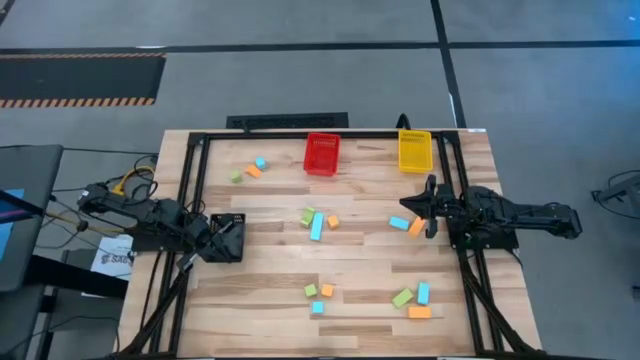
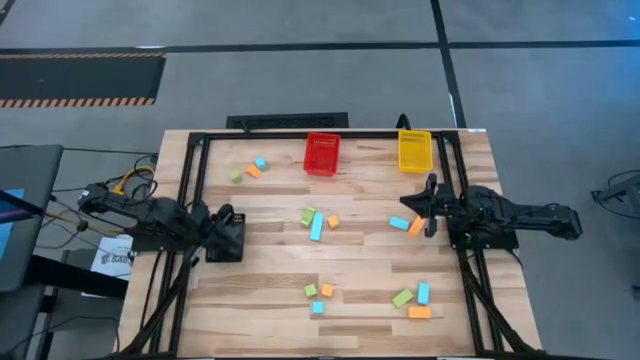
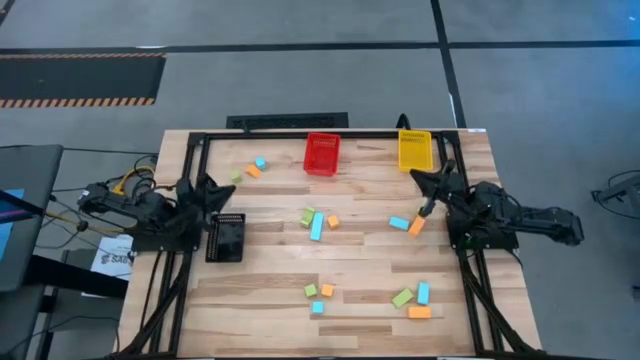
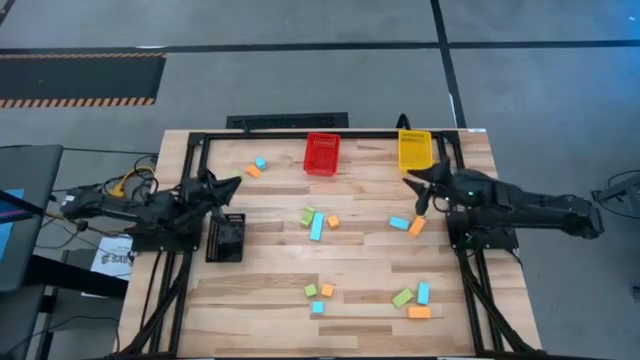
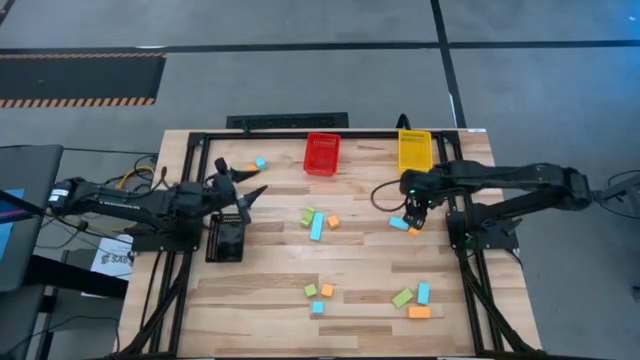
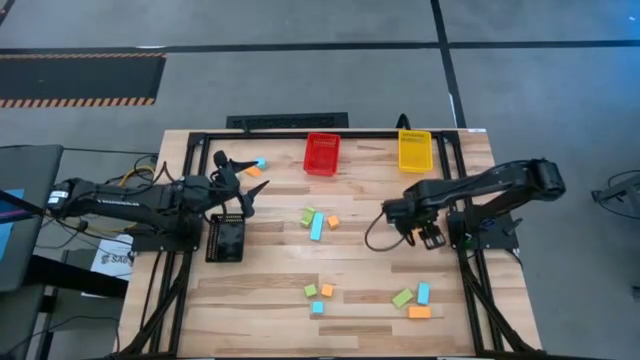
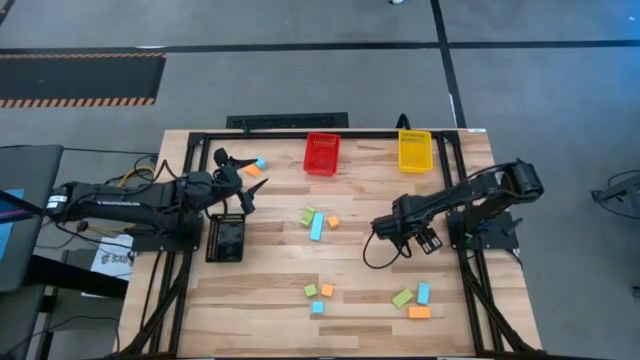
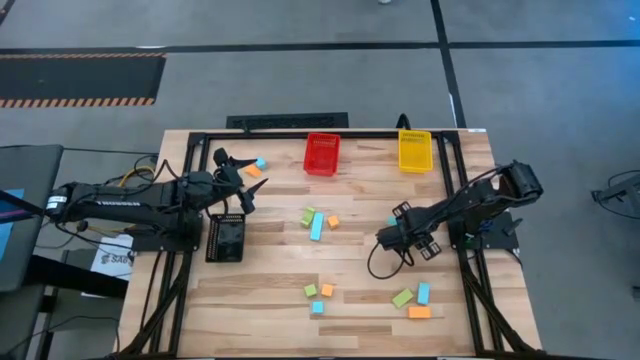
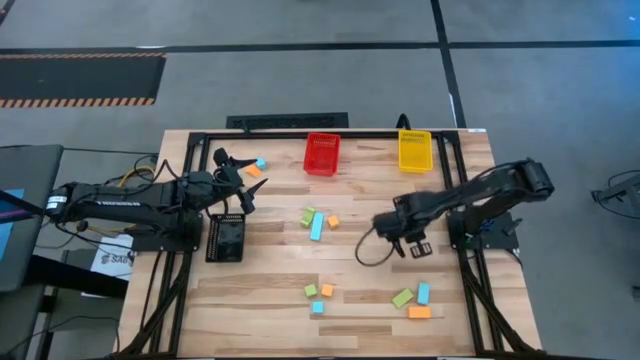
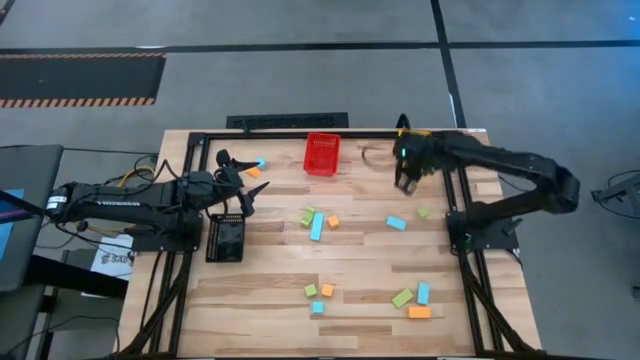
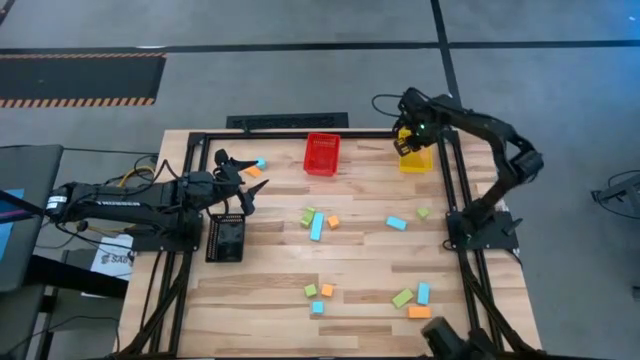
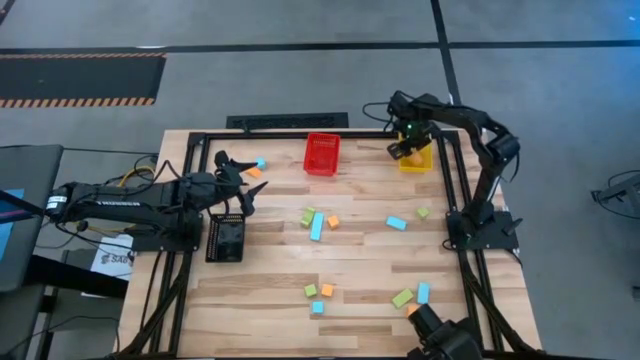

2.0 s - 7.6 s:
Task: Sort & place blocks by color
Put the orange block into the yellow bin

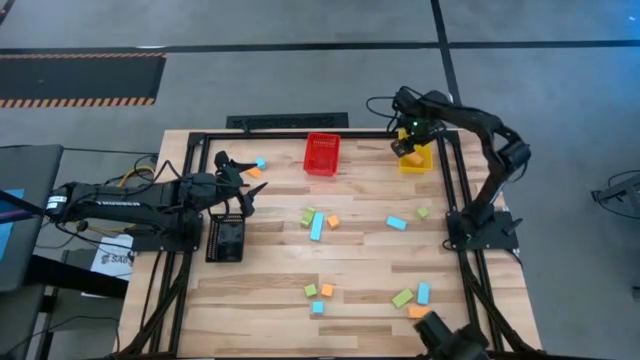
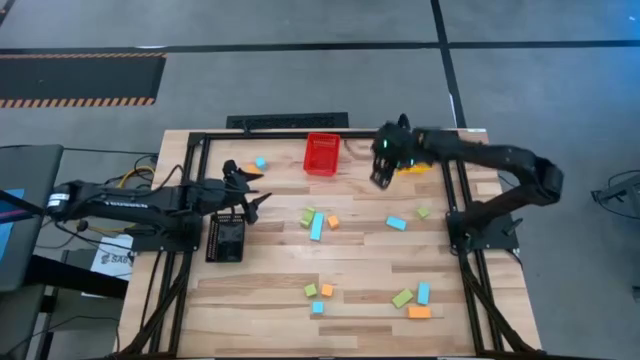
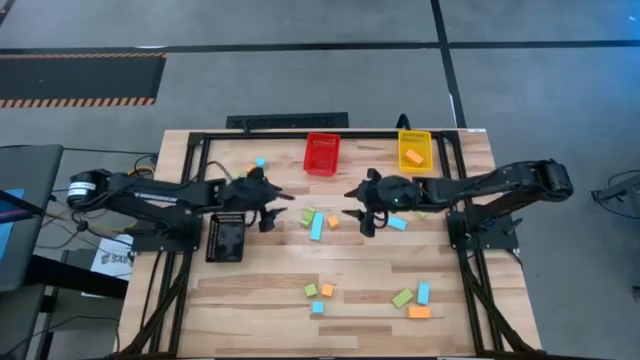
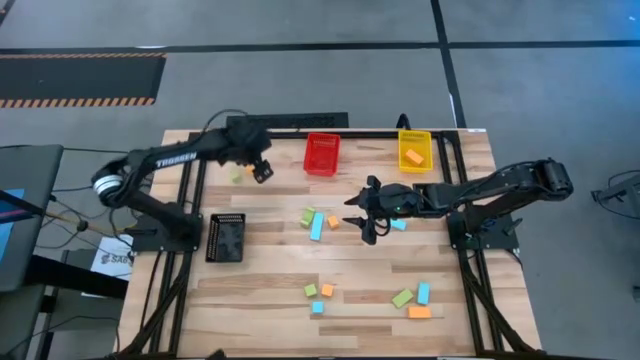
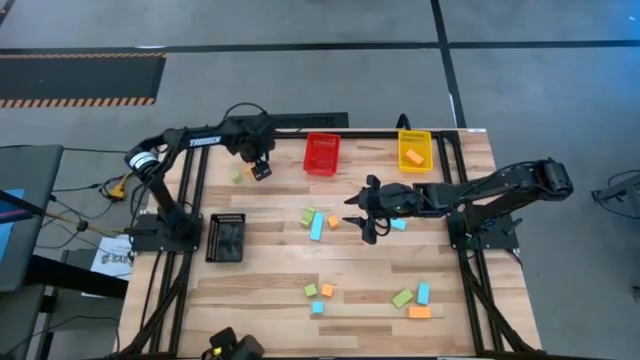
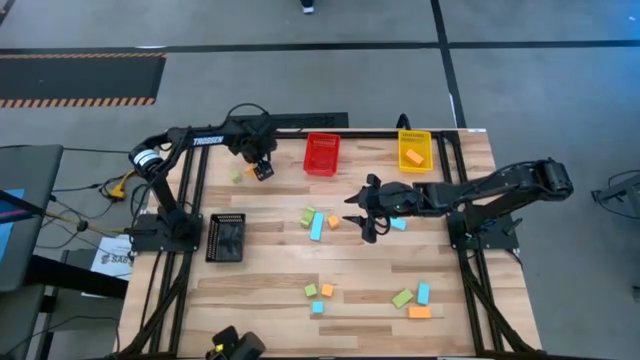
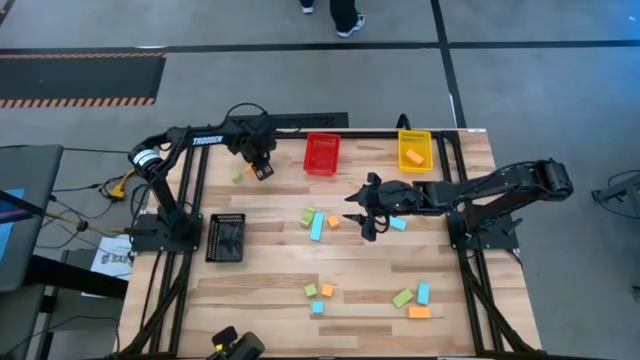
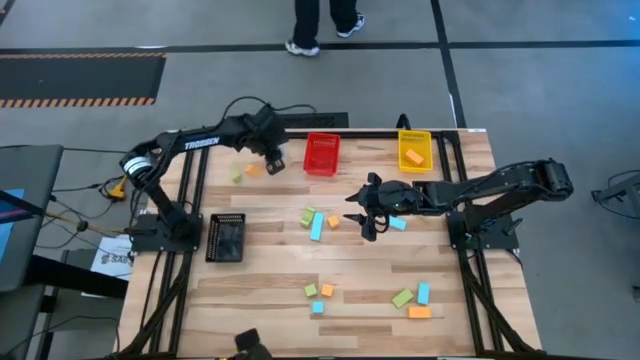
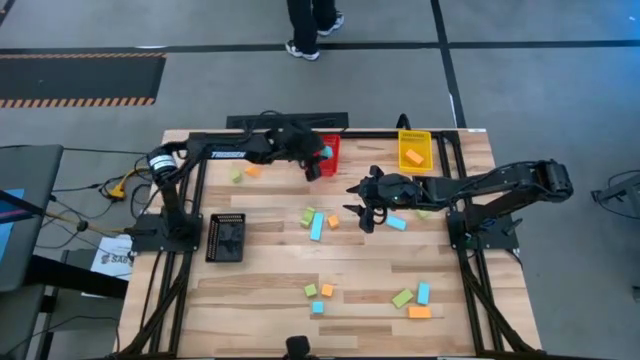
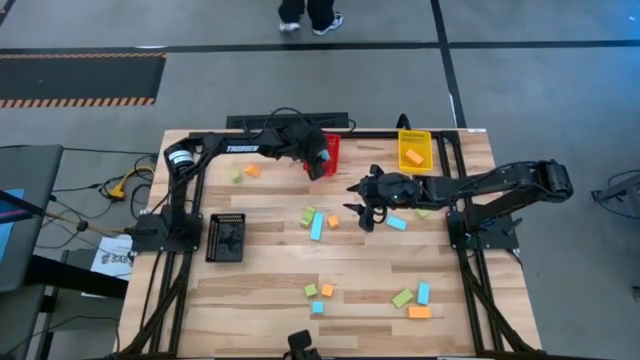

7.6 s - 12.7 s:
Put the blue block into the red bin

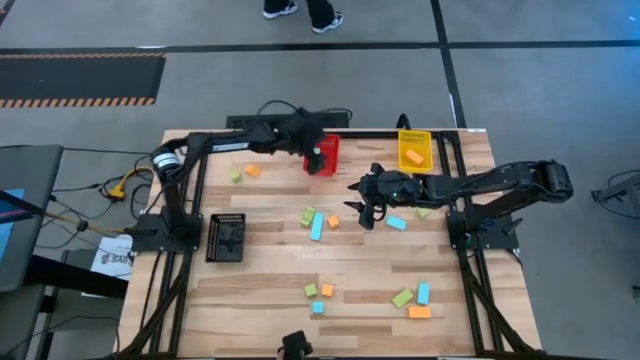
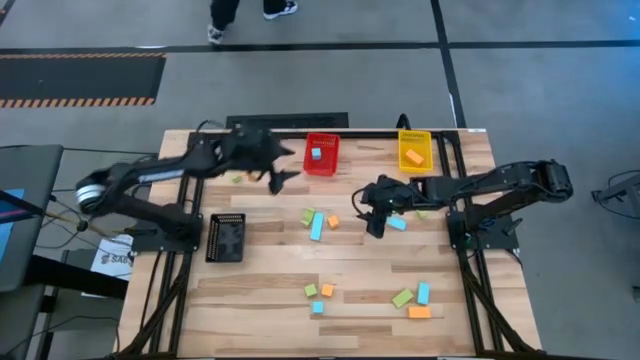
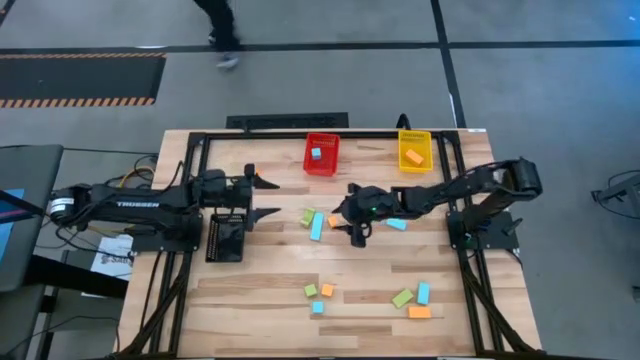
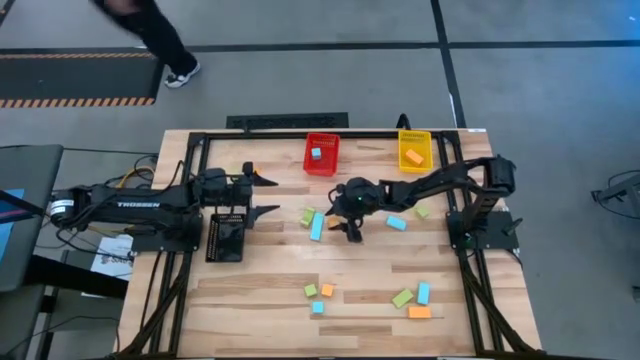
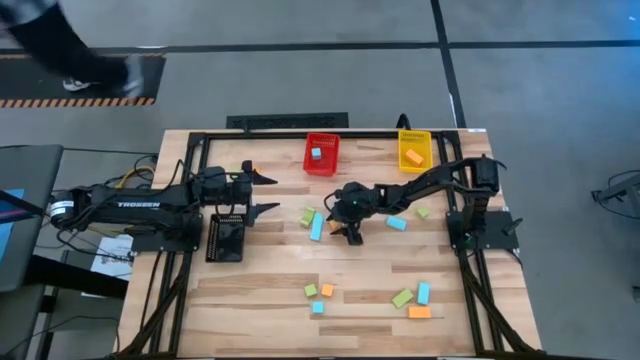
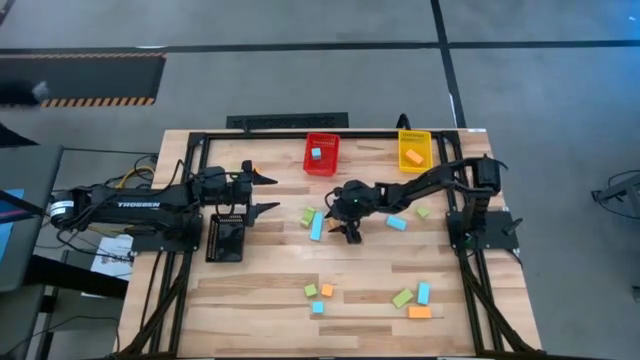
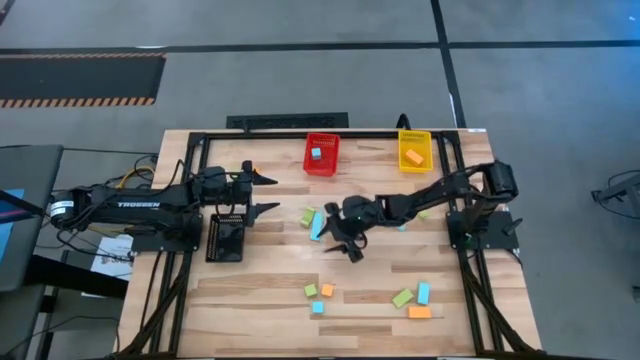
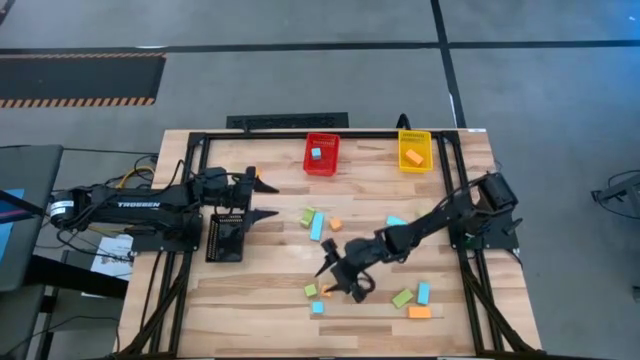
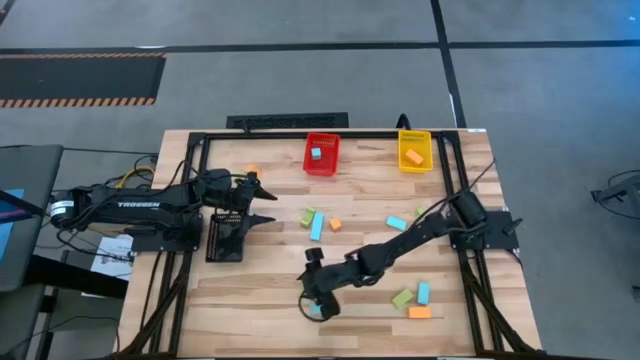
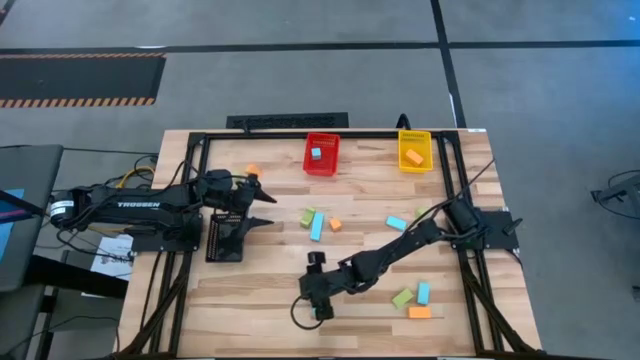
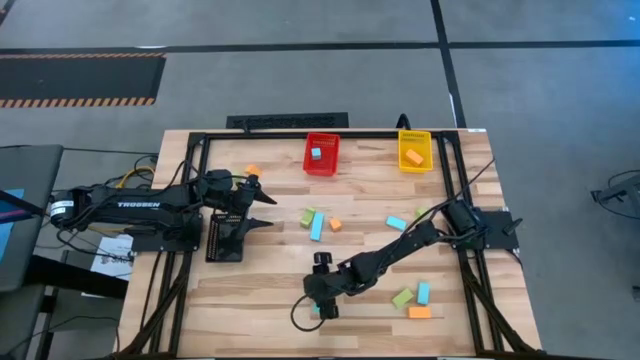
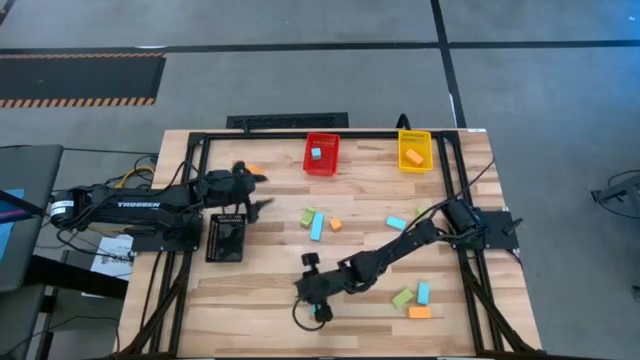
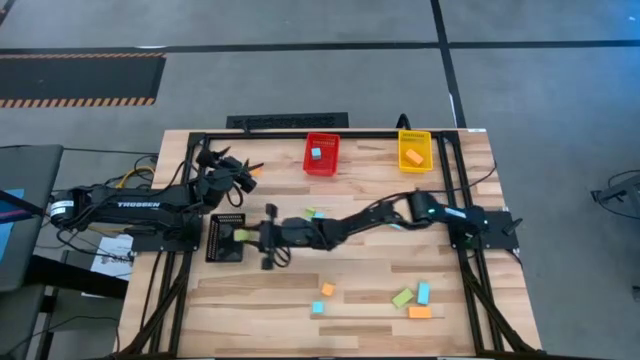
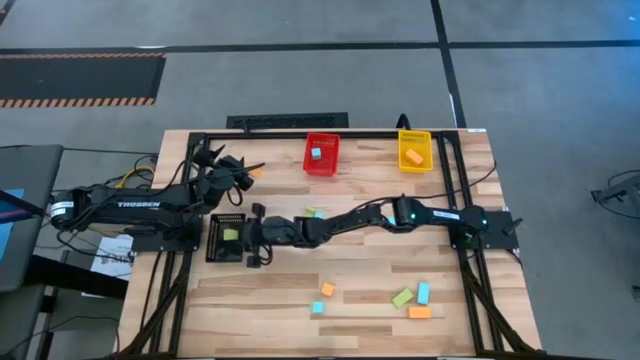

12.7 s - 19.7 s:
Put the green block into the black bin

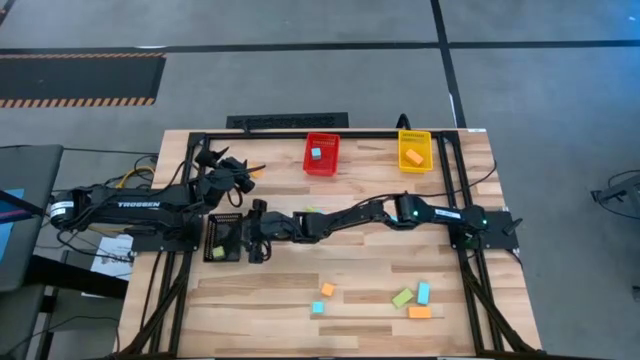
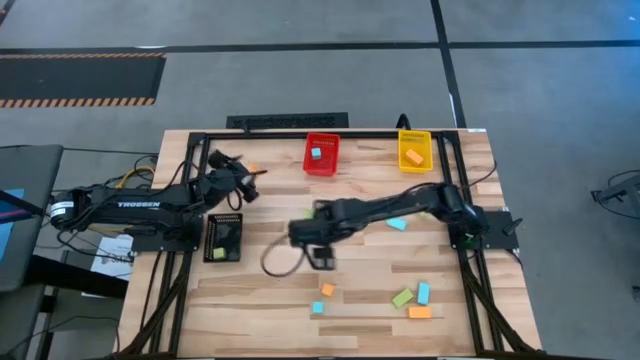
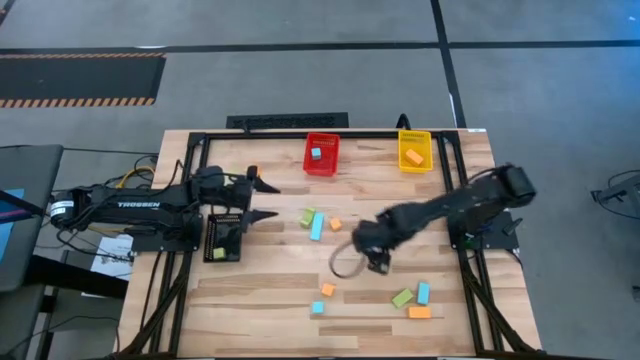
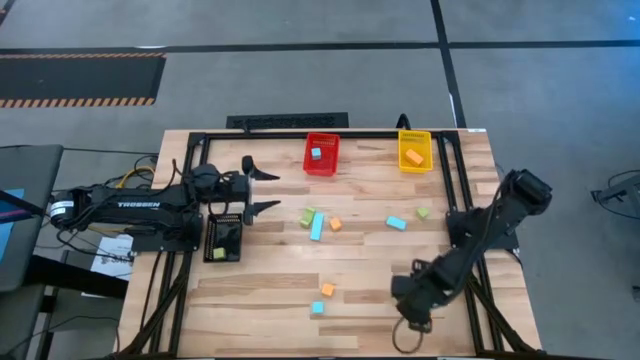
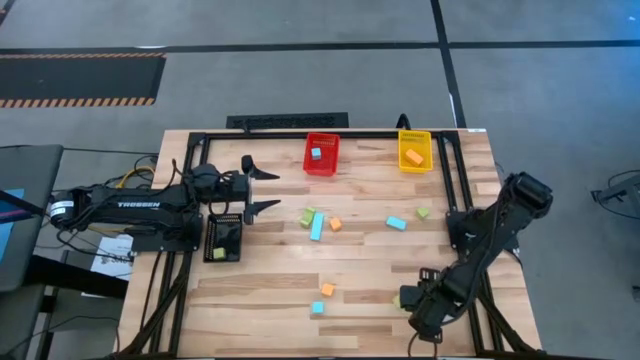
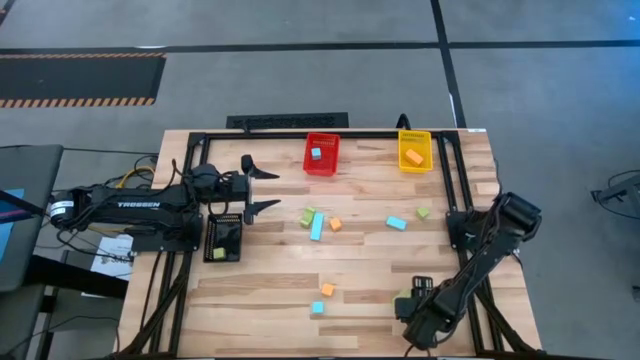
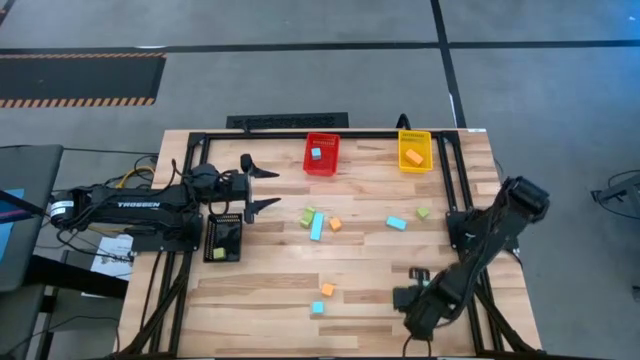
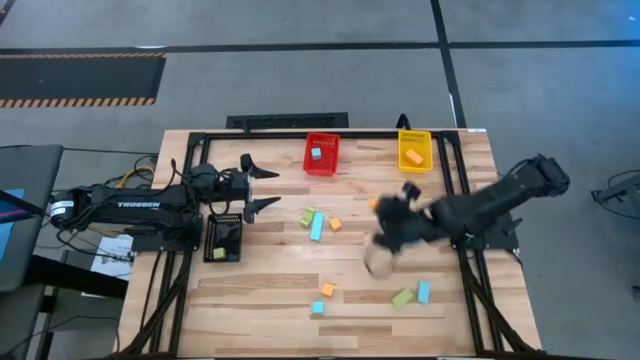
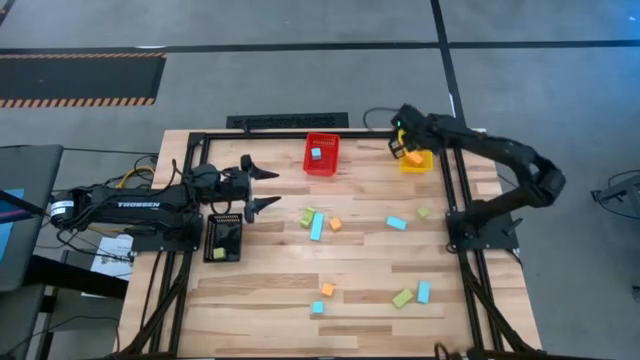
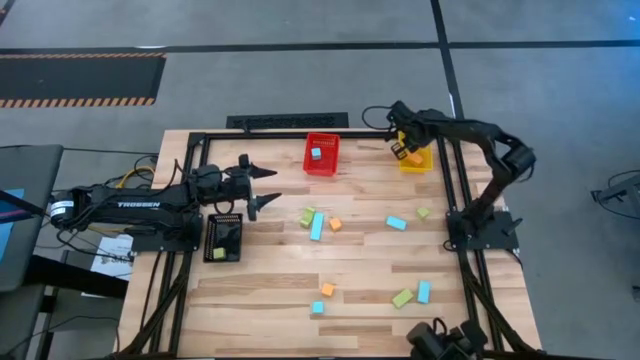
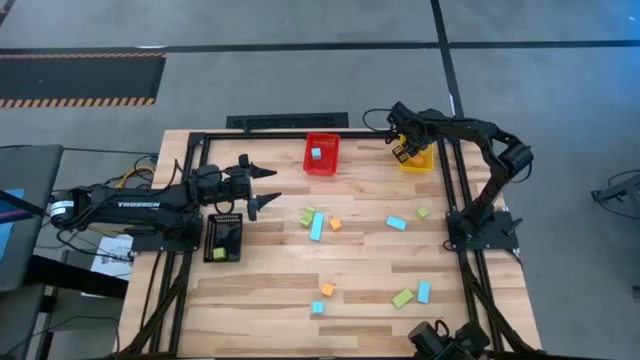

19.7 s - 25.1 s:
Put the orange block into the yellow bin
